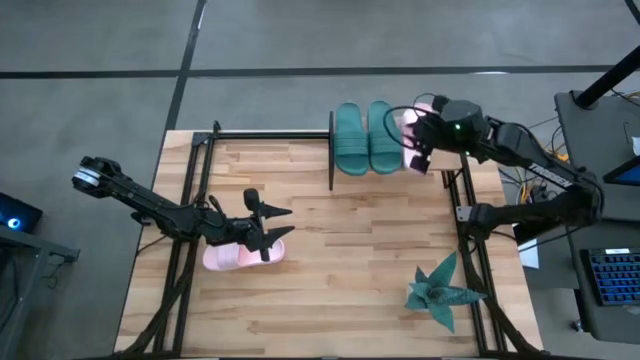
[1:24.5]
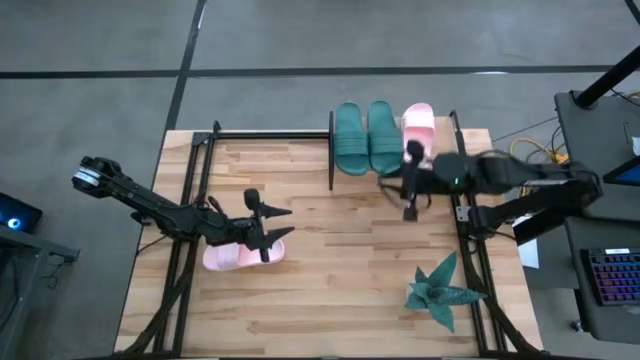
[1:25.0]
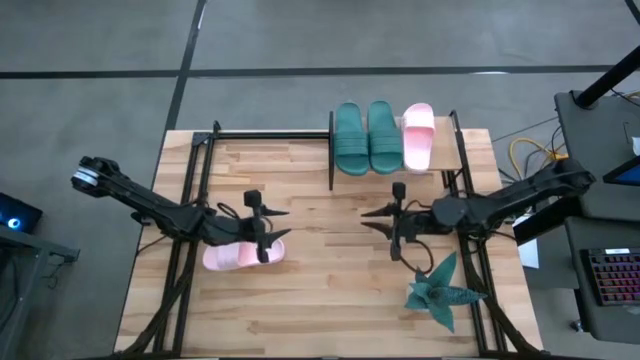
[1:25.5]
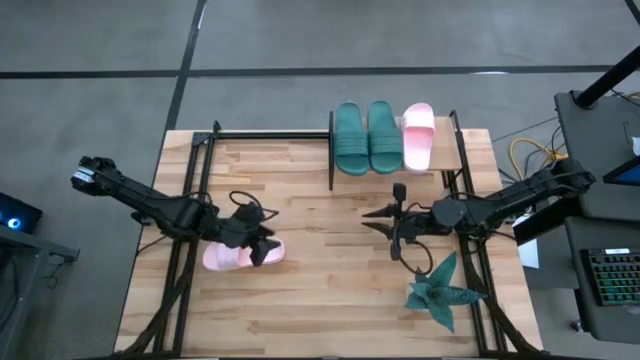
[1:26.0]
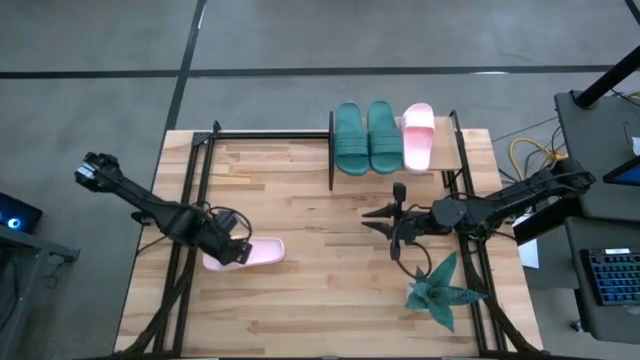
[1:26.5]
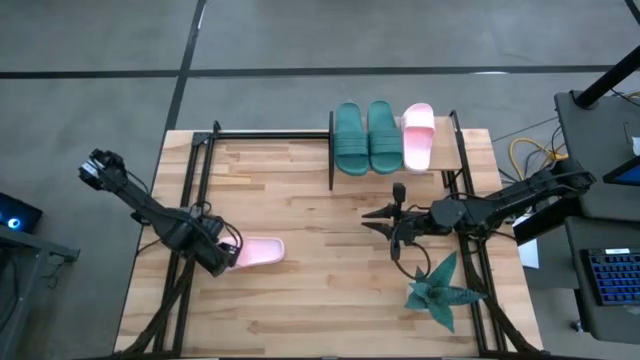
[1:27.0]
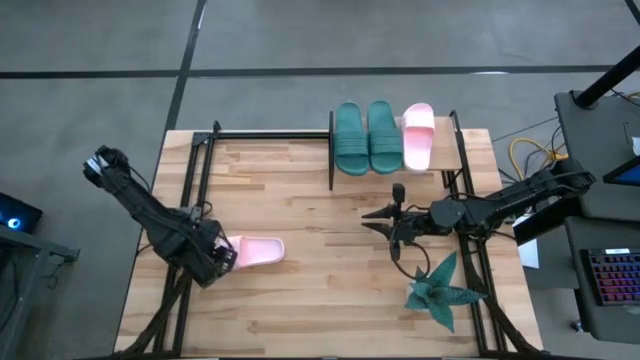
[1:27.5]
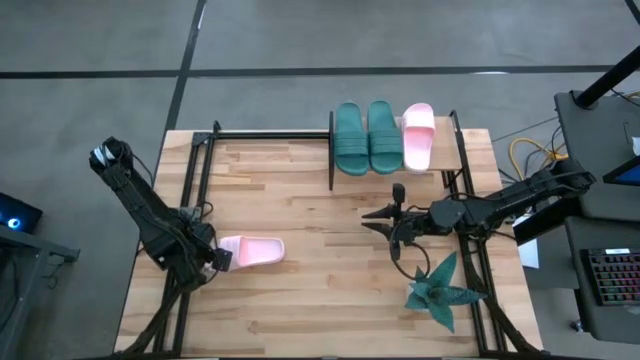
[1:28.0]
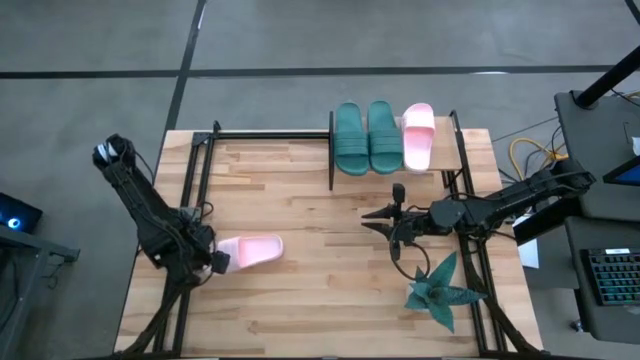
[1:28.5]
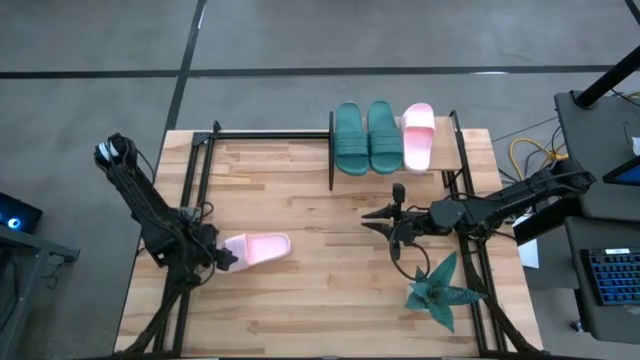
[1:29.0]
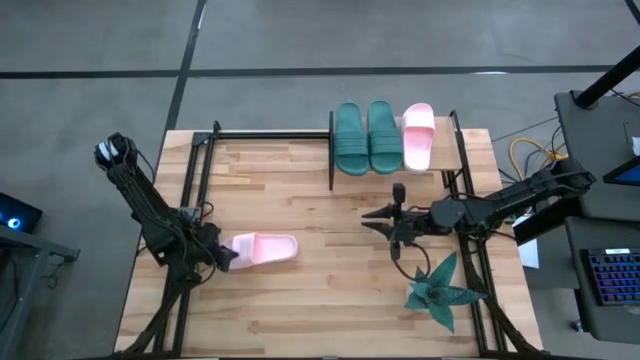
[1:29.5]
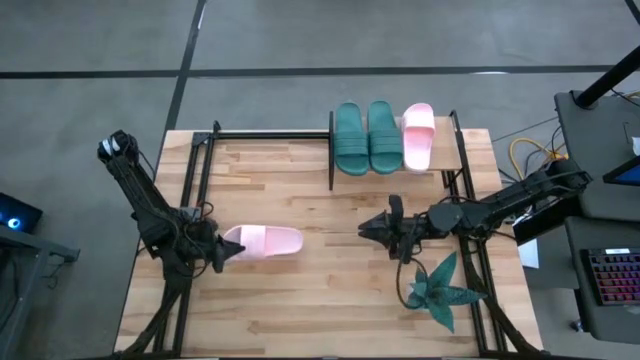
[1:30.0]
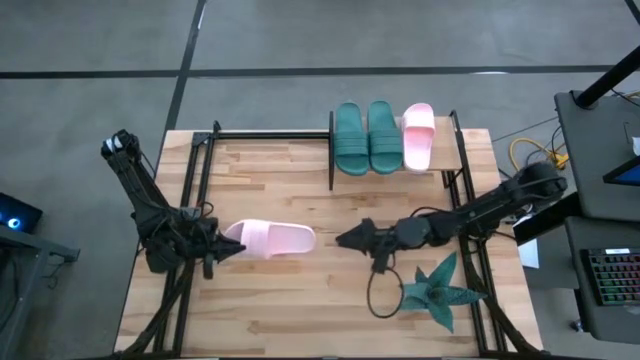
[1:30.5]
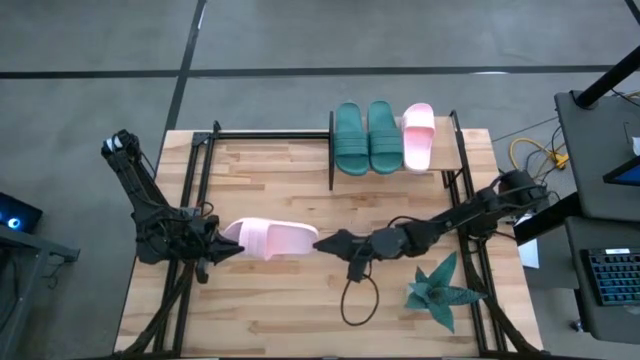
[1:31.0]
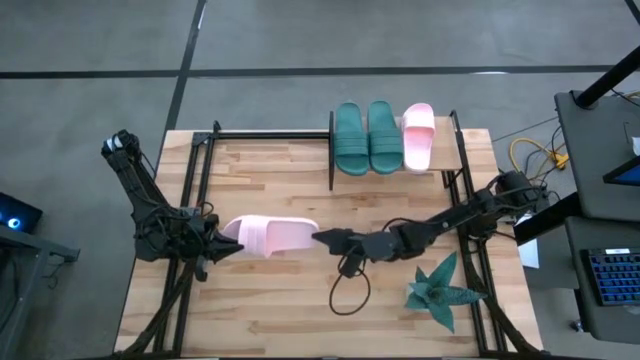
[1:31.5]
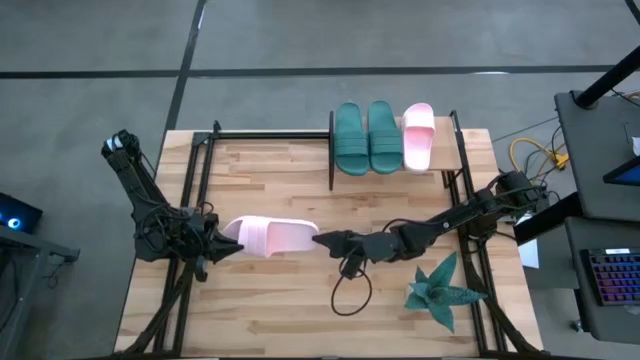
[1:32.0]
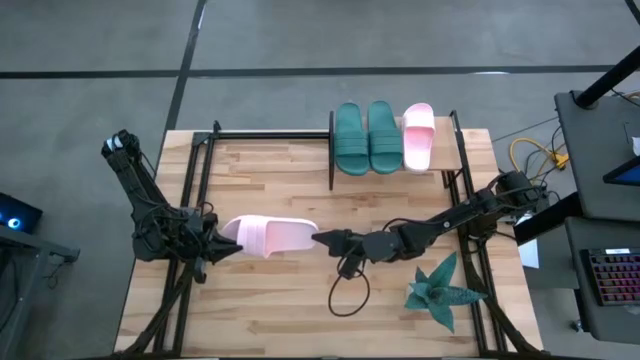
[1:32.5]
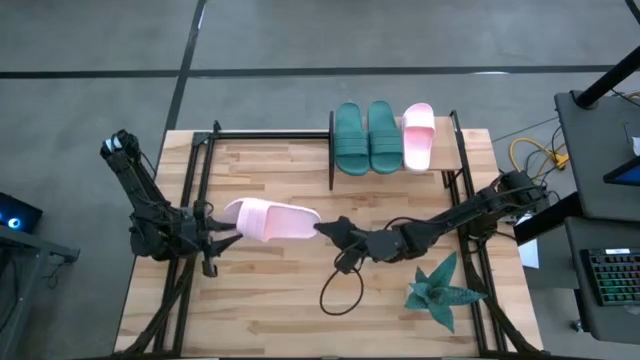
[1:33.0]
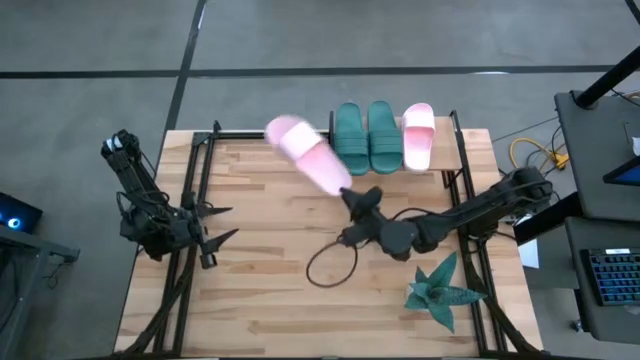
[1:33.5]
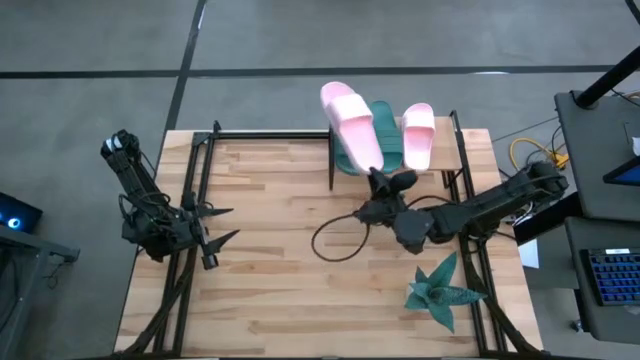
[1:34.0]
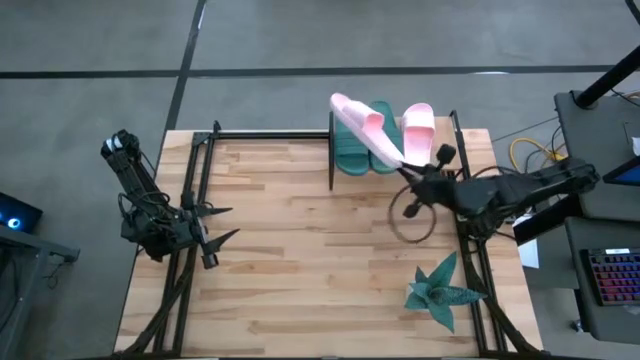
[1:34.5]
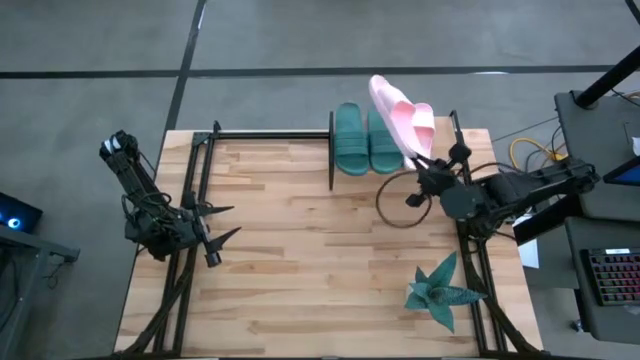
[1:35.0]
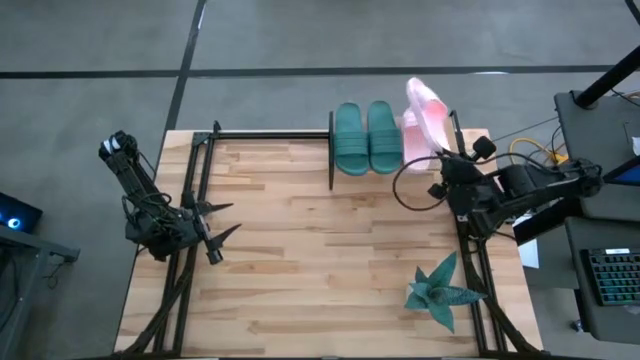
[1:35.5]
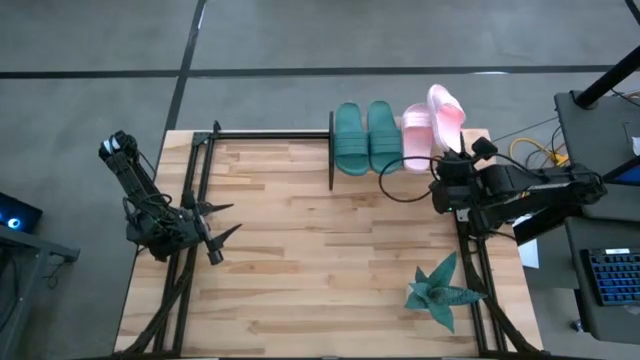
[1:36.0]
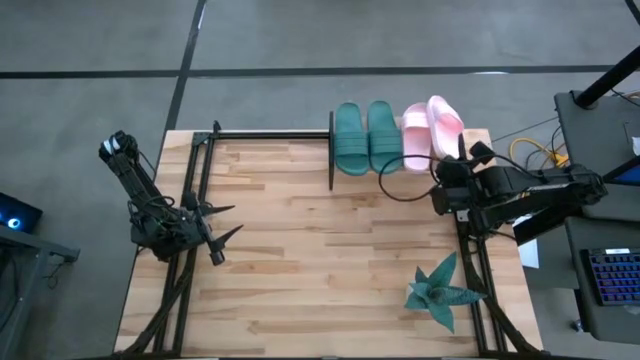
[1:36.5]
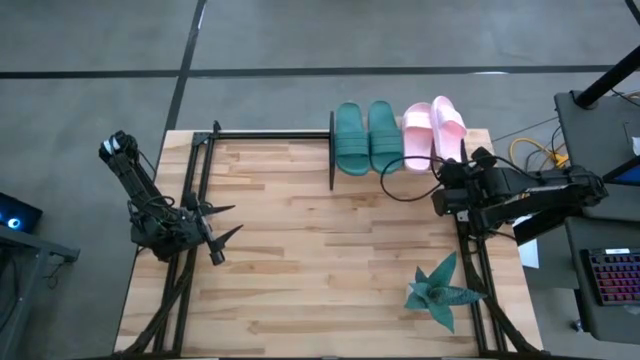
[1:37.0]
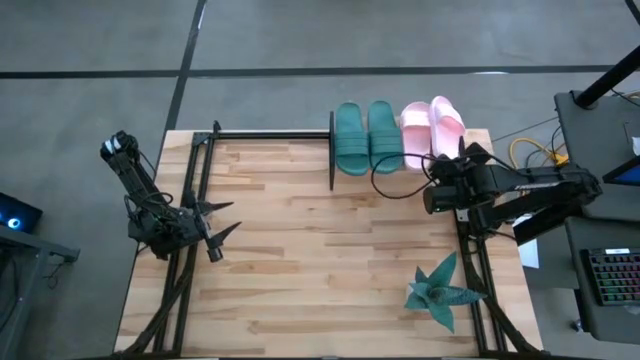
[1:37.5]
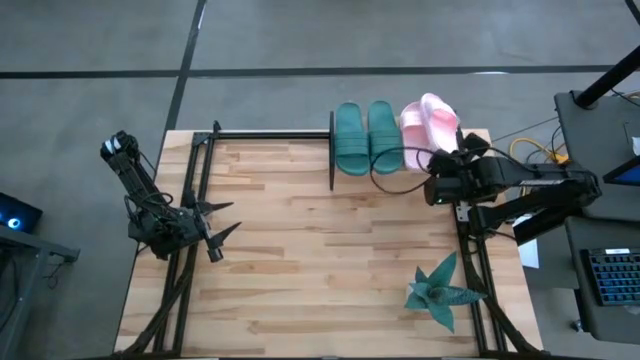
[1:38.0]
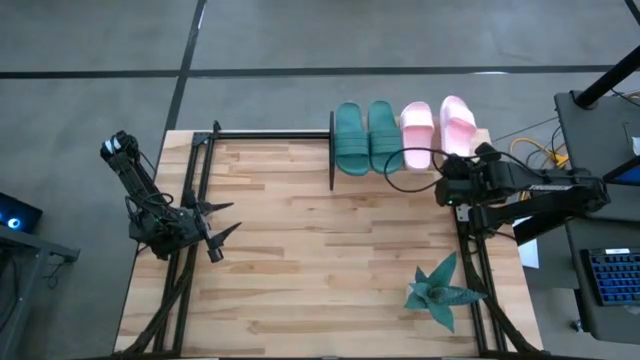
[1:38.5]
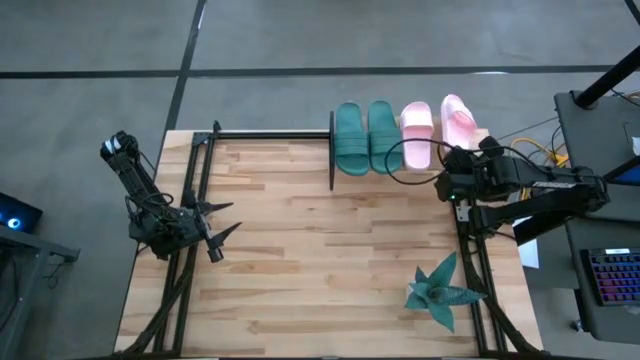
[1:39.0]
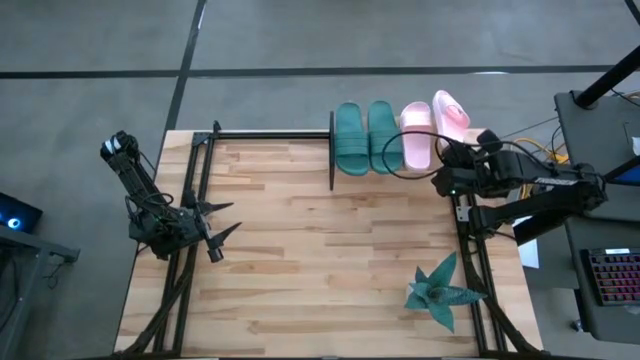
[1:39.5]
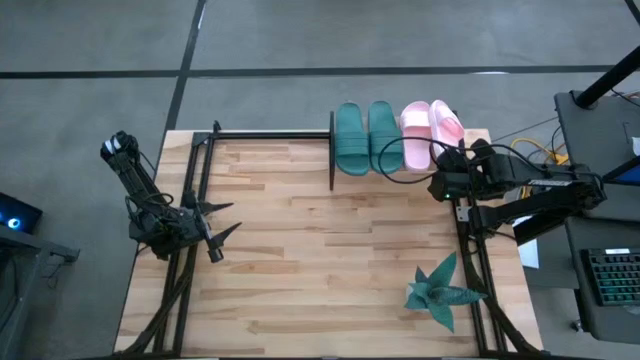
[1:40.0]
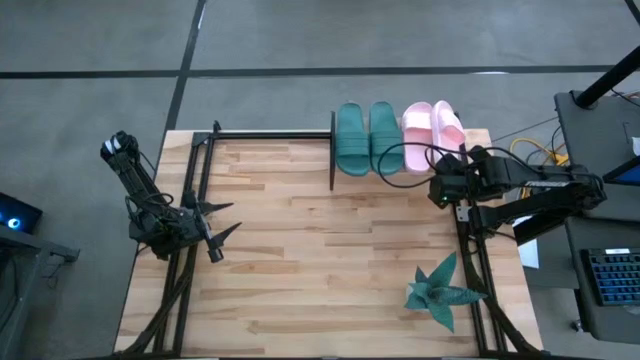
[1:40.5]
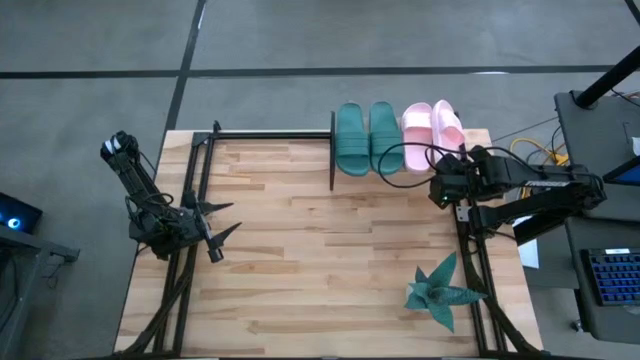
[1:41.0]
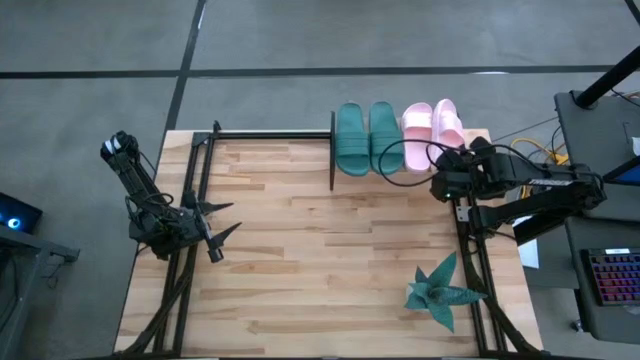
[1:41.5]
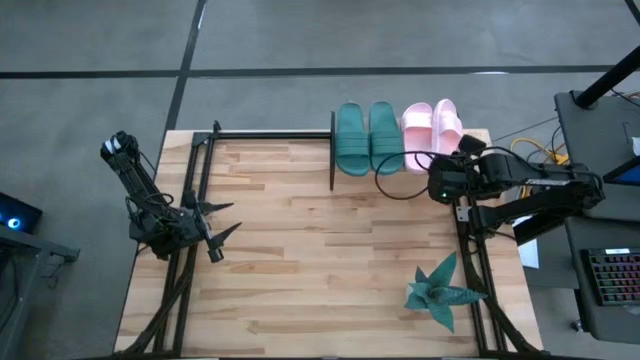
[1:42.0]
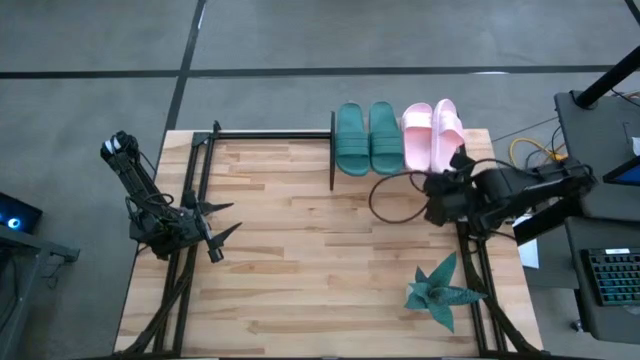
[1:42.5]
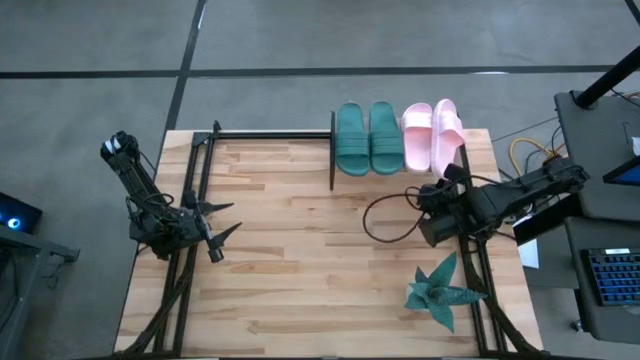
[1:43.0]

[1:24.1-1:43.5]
Task: Pick and place slides into the shelf
Put the pink slipper on the shelf

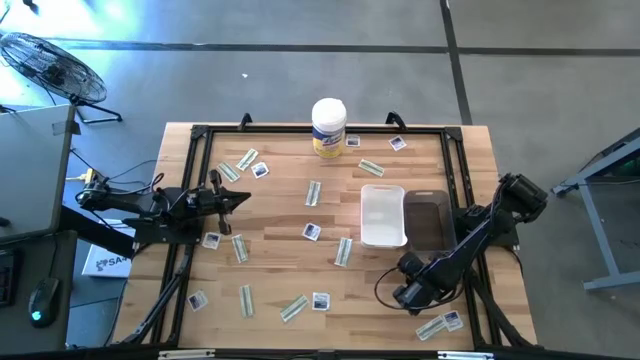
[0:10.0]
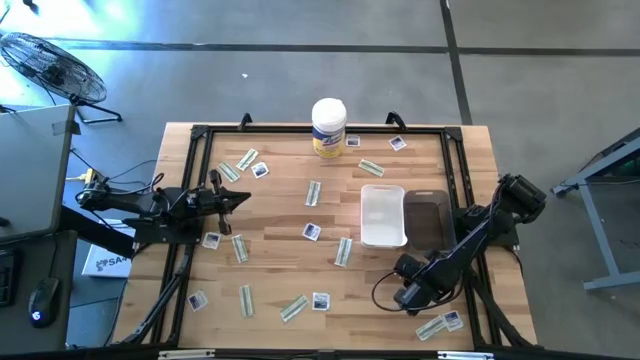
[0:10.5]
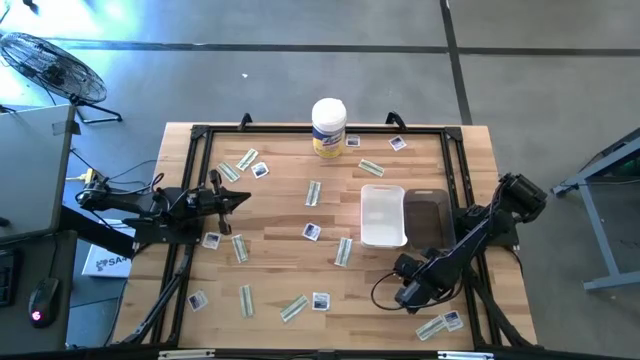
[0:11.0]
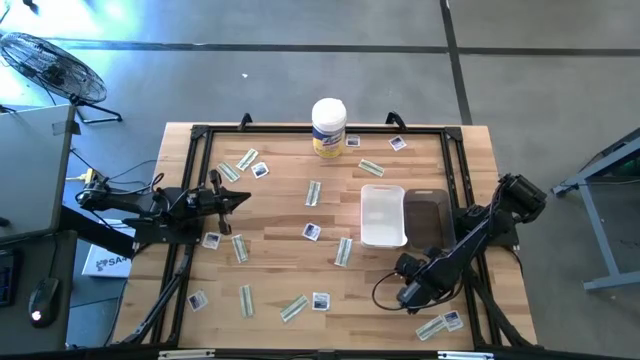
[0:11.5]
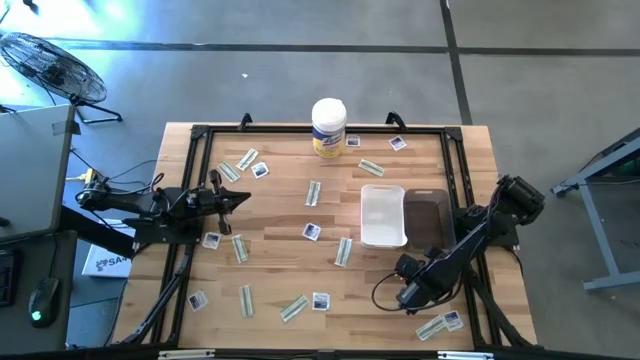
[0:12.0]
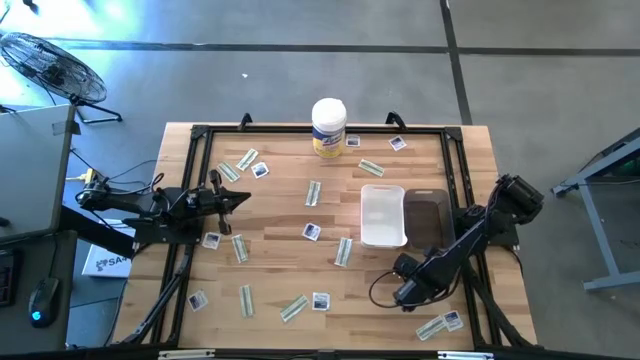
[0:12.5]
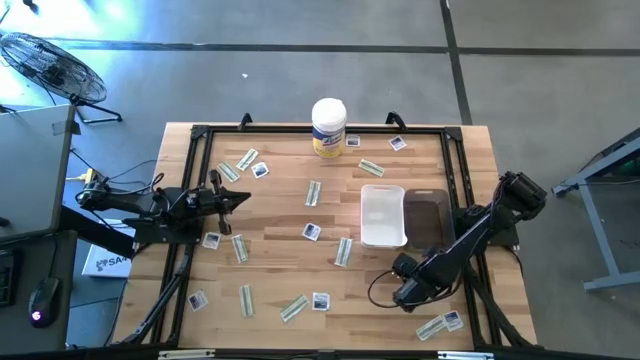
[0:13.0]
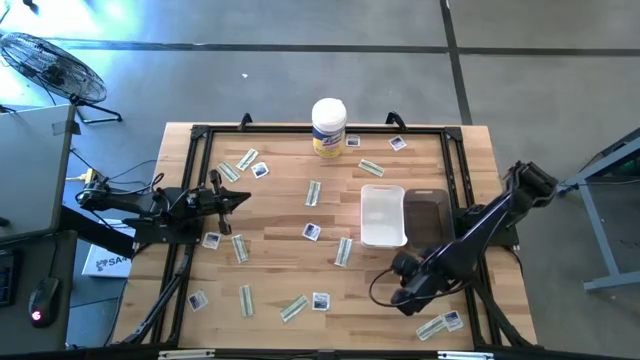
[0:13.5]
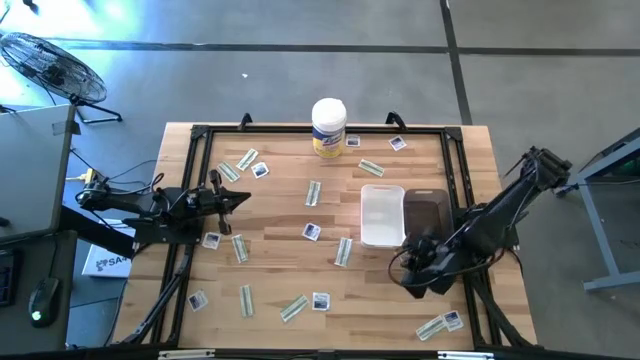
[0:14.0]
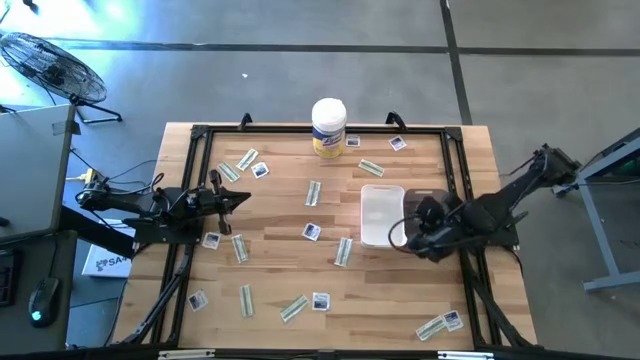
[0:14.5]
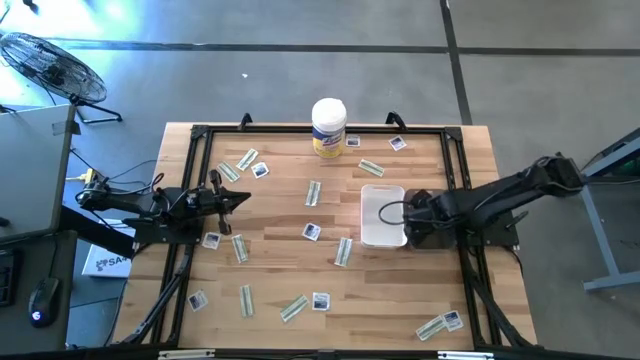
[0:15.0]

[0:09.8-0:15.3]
Task: Pick & Place First Aid Supplies
Put the blue alcohol pad into the black bin
